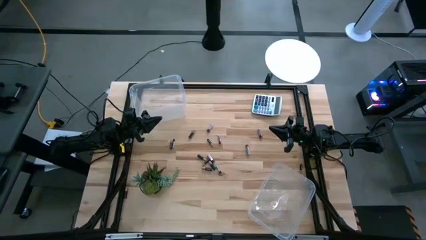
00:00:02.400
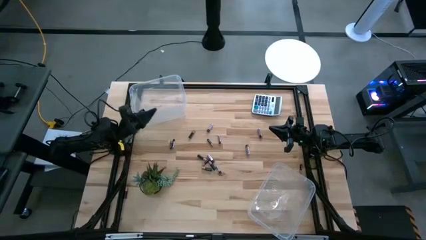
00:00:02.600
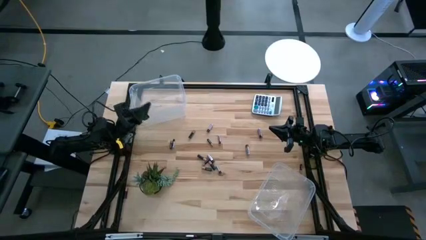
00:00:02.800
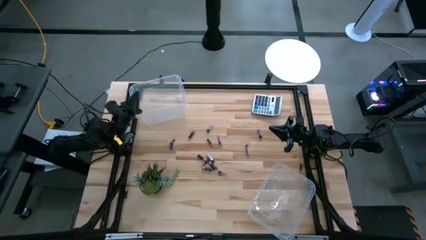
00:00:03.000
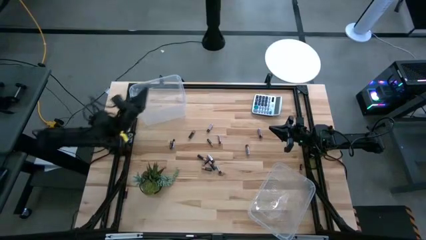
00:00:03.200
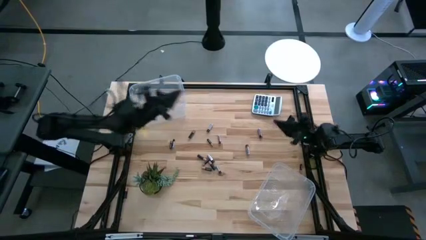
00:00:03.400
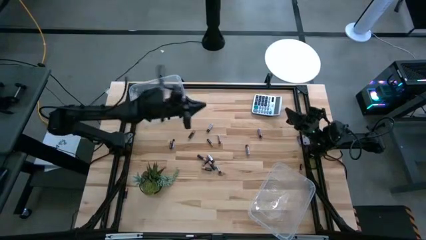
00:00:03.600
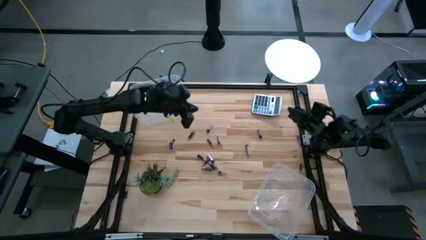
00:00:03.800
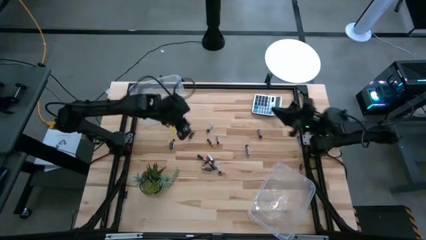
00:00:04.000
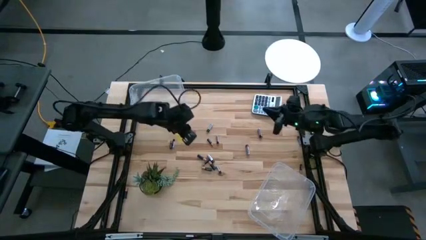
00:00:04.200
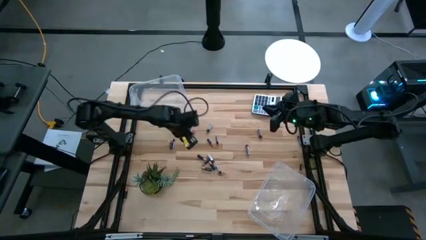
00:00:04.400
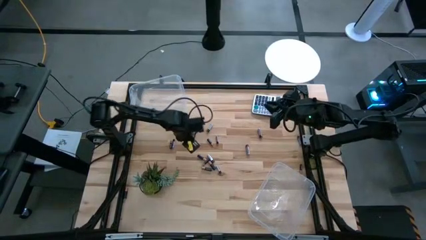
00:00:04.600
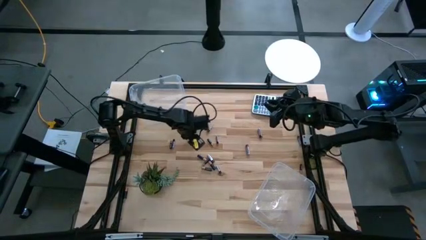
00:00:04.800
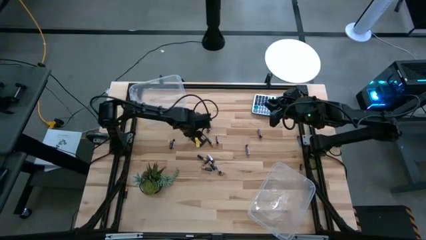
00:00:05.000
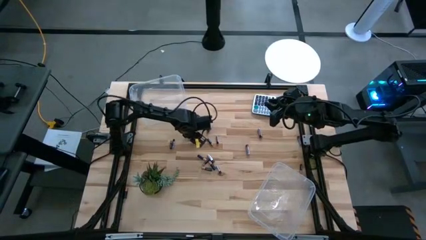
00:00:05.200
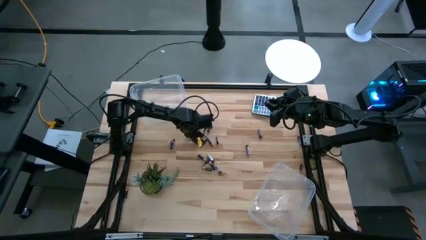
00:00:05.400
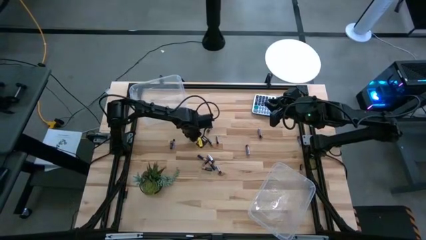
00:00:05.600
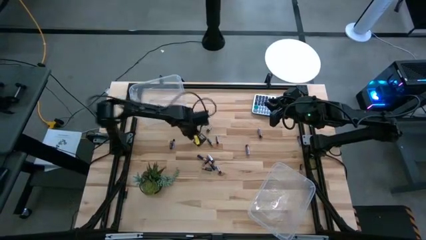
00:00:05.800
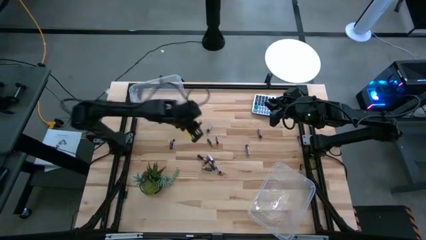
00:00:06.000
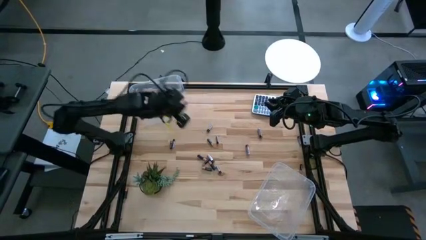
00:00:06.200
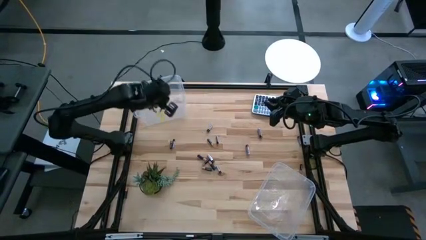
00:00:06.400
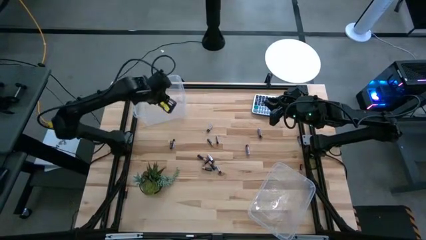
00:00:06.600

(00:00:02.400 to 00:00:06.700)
Task: Sort batteries
Put the black battery into the top transparent bin

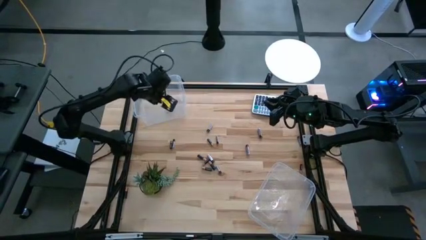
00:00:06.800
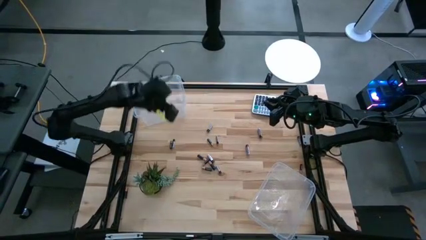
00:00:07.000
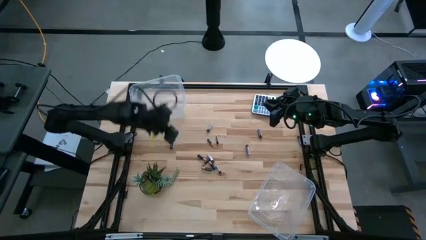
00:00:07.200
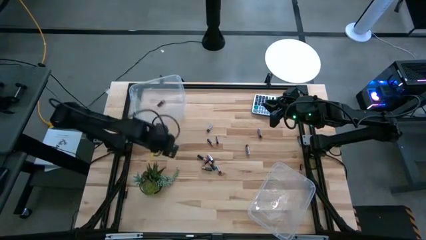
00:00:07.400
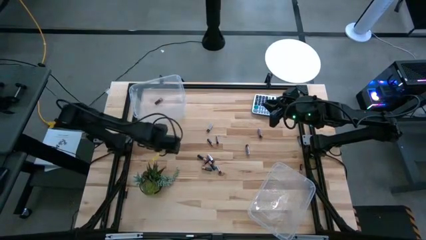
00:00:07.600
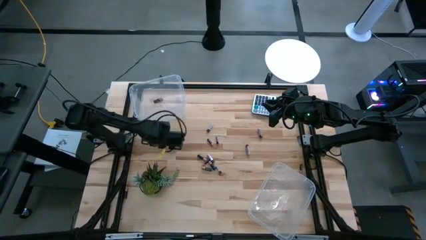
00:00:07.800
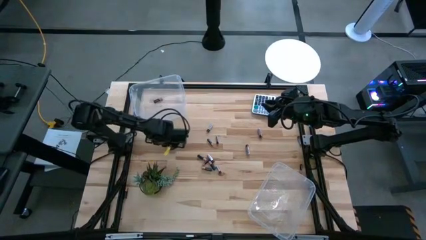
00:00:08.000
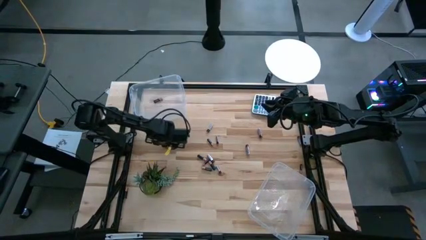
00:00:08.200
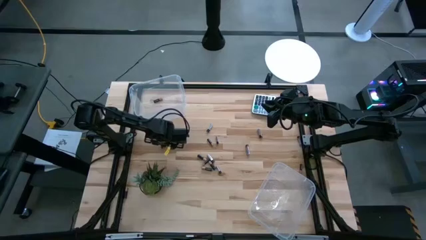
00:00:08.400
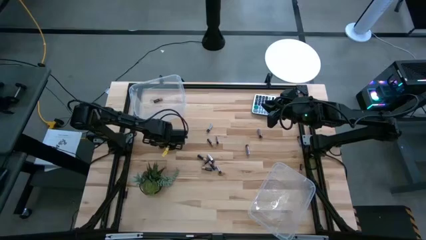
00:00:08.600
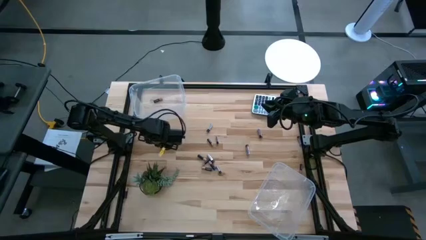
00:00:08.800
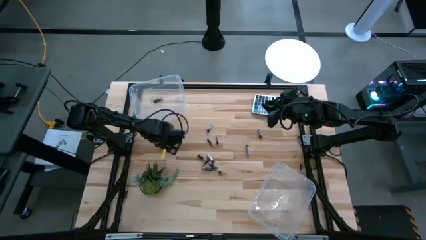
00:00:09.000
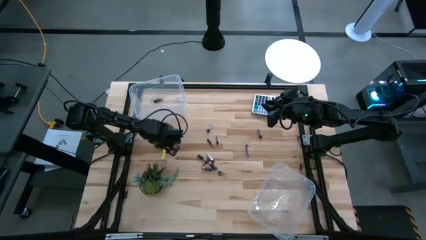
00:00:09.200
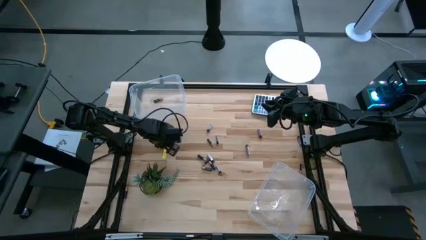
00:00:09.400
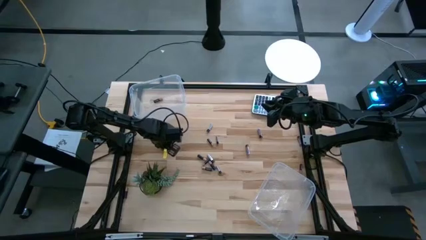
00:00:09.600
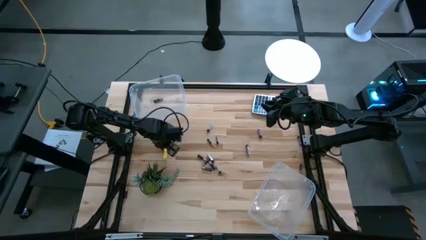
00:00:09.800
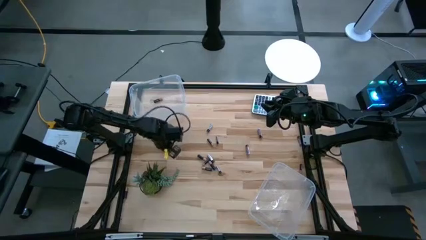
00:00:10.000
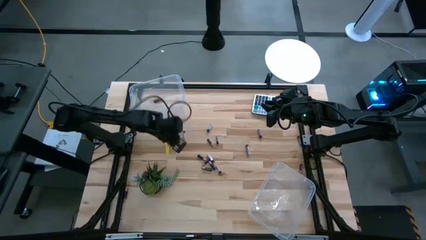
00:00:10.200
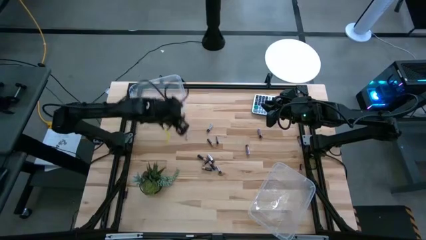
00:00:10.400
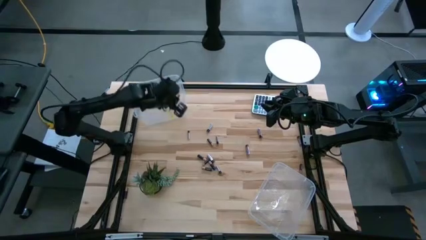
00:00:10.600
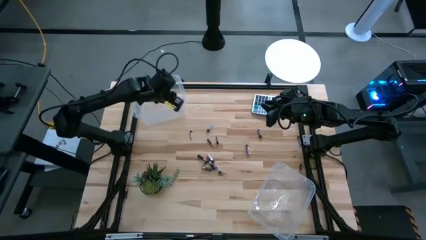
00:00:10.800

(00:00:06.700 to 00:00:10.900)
Put the black battery into the top transparent bin

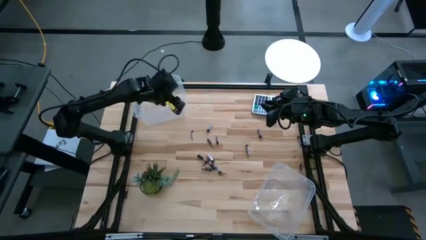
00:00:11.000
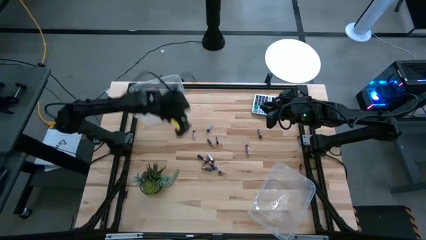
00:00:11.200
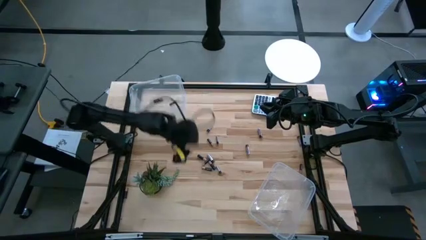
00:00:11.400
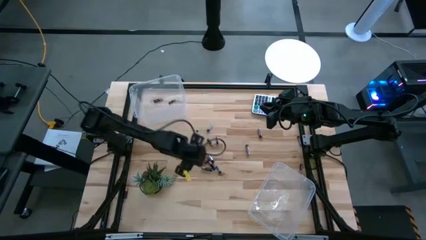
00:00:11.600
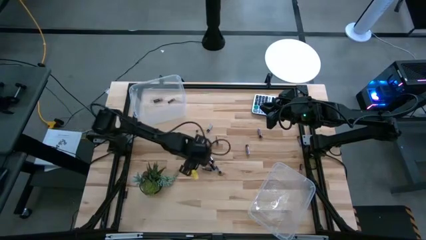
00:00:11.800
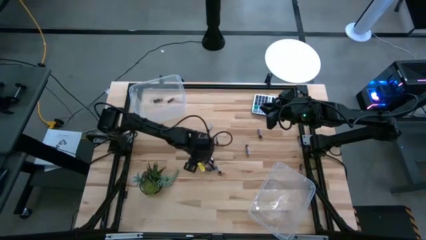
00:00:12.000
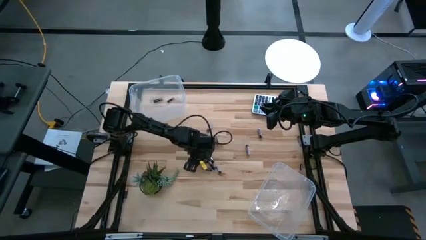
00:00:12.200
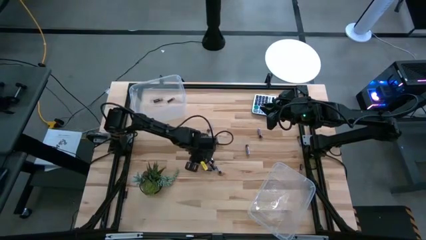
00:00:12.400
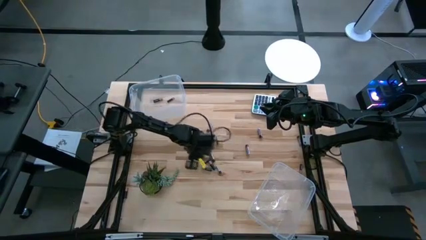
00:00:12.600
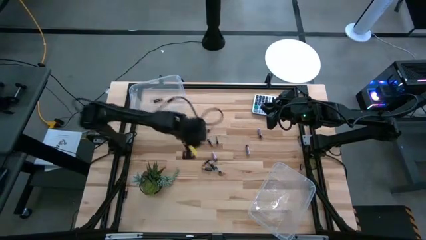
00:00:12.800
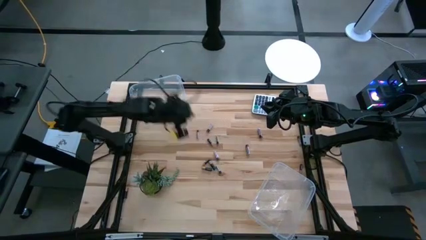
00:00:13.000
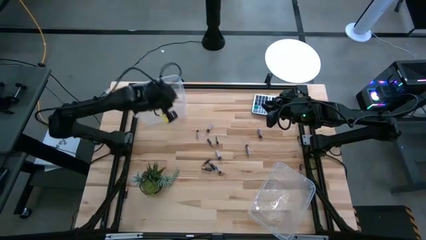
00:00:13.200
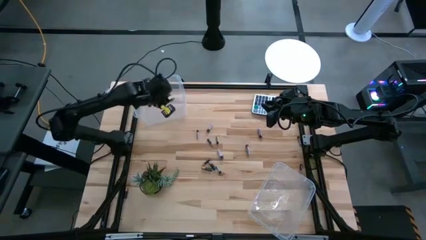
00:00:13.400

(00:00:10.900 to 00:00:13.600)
Put the black battery into the top transparent bin

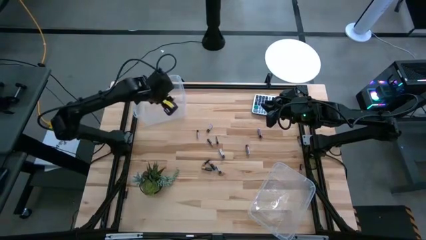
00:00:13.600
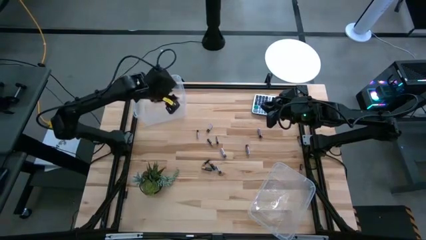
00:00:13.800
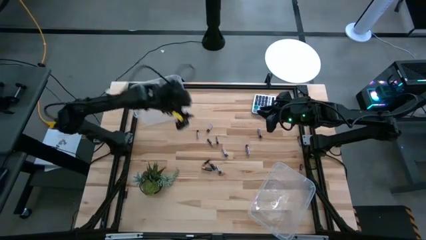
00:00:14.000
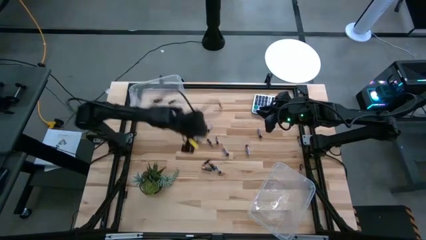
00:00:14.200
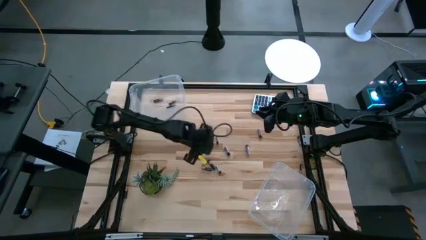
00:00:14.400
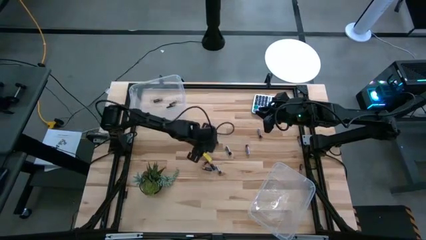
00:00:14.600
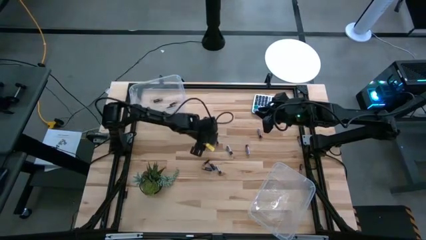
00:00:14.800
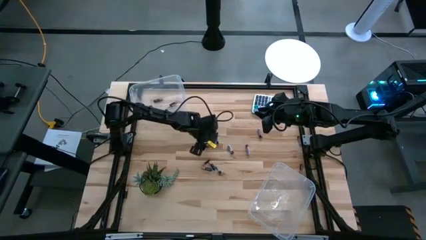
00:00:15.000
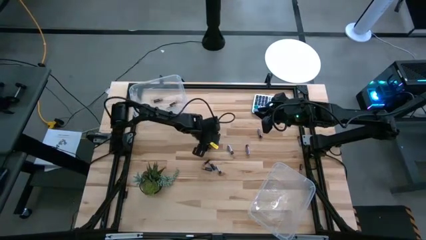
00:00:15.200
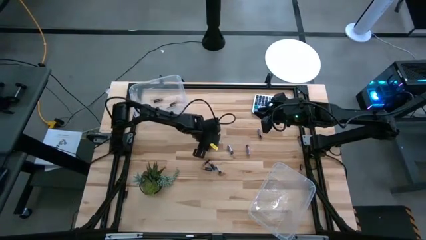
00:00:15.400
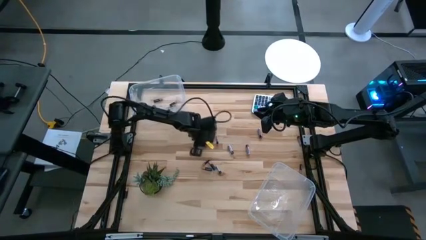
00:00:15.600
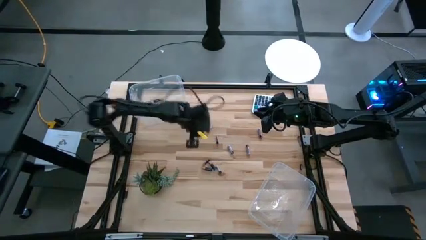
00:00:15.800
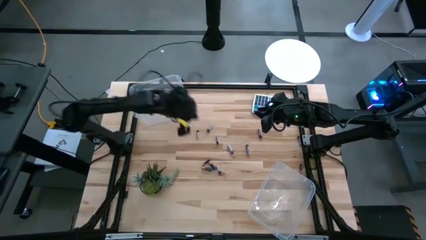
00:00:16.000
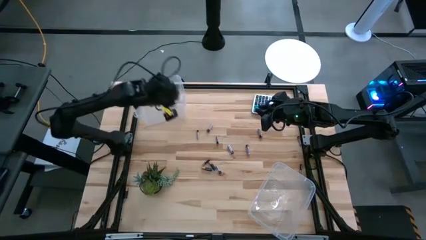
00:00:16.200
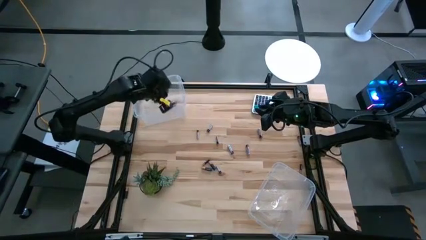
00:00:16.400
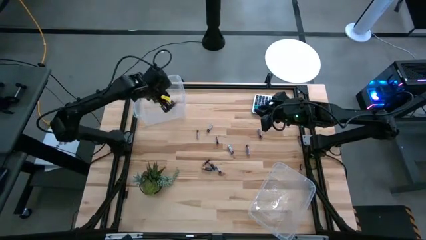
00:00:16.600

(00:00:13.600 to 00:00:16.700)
Put the black battery into the top transparent bin

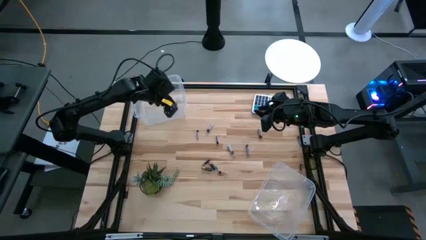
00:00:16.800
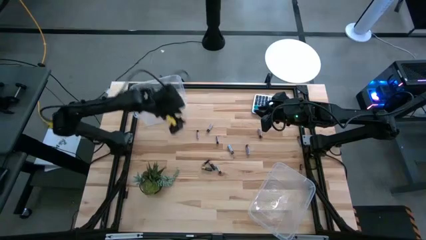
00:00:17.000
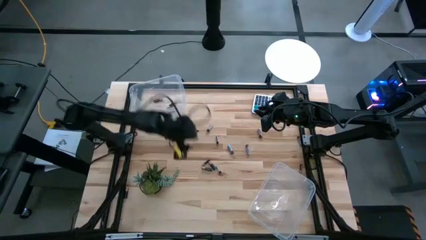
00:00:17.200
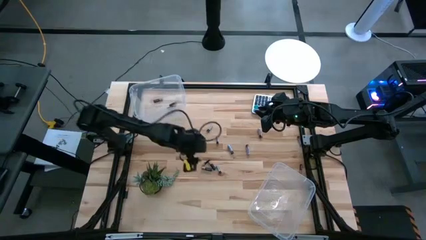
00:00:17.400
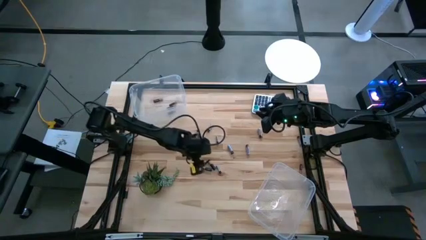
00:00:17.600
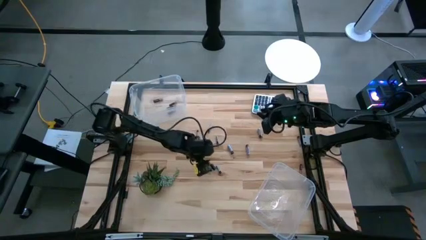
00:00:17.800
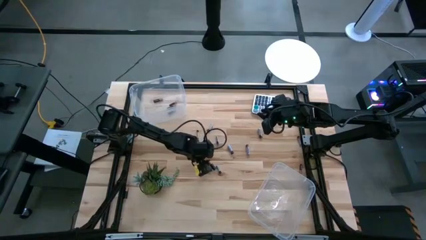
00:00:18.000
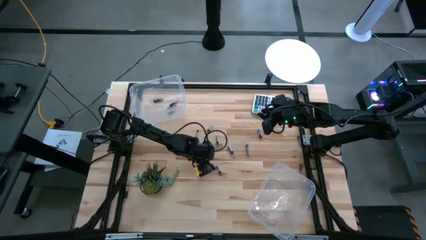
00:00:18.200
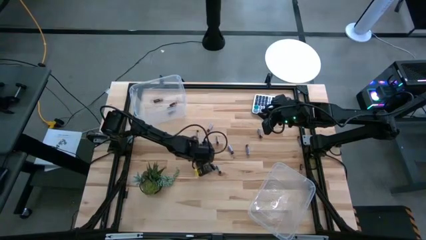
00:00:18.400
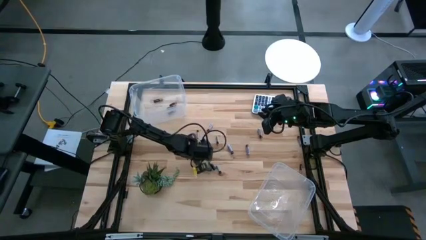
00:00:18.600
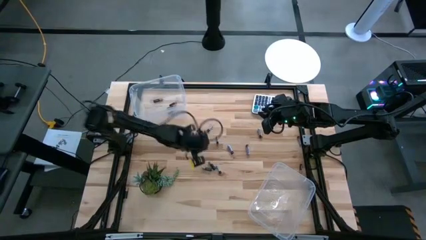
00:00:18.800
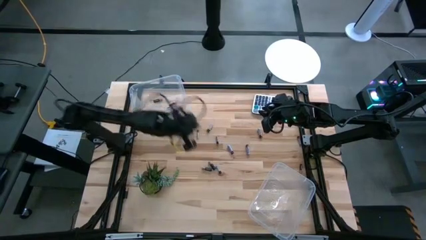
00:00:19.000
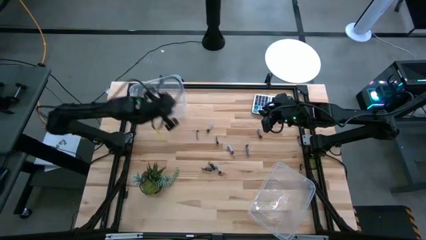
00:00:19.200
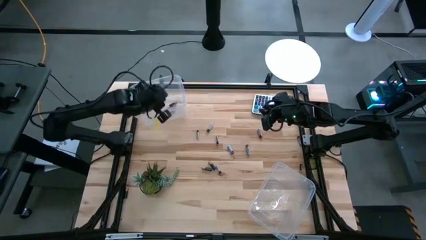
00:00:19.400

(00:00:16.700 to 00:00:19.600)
Put the black battery into the top transparent bin
